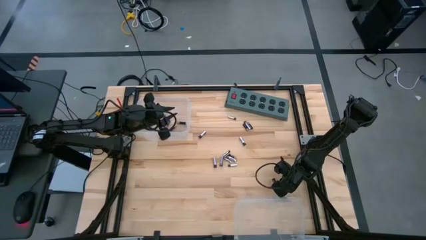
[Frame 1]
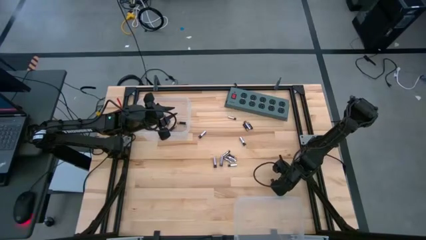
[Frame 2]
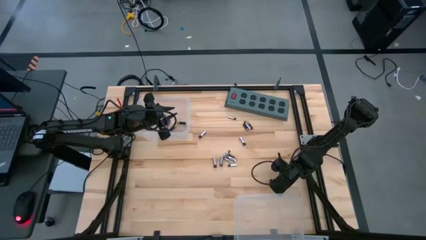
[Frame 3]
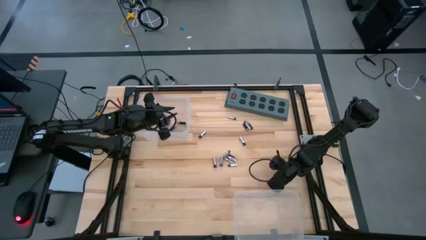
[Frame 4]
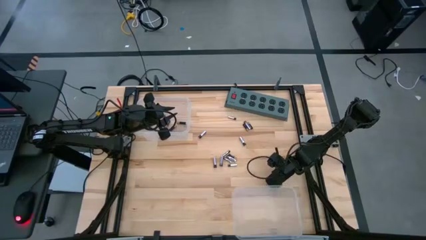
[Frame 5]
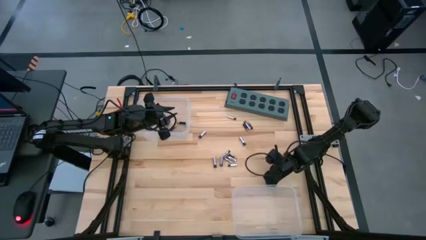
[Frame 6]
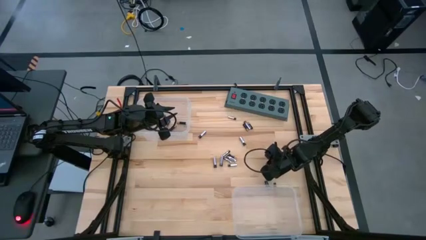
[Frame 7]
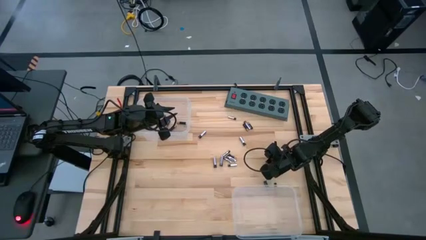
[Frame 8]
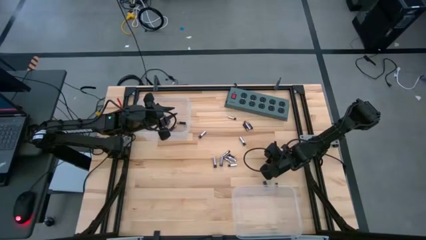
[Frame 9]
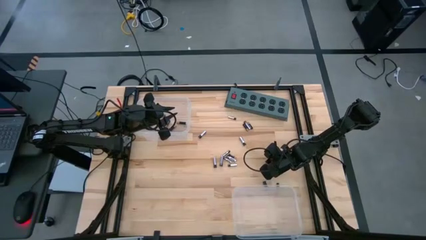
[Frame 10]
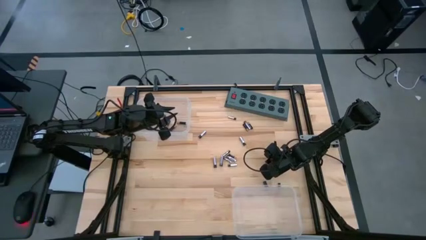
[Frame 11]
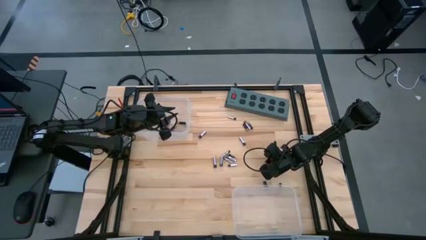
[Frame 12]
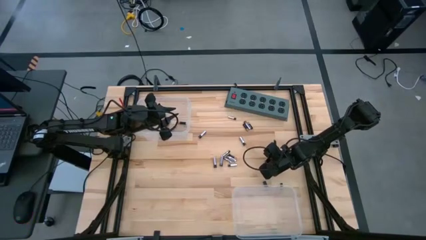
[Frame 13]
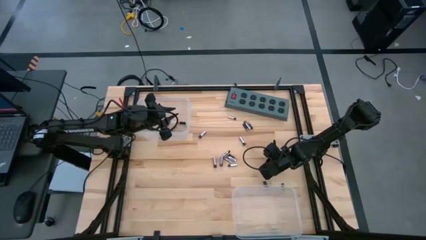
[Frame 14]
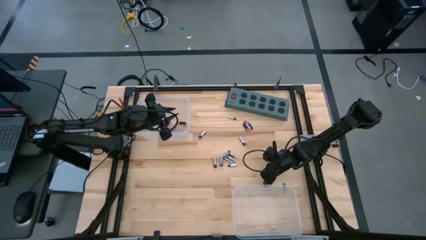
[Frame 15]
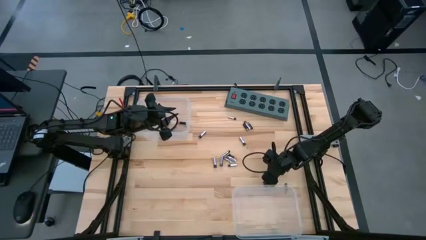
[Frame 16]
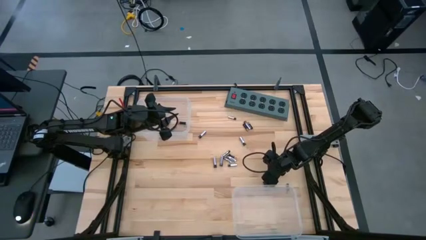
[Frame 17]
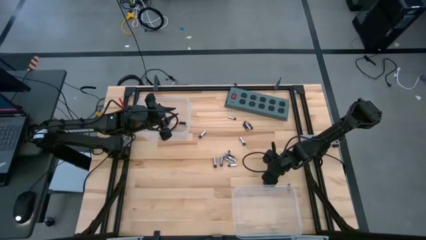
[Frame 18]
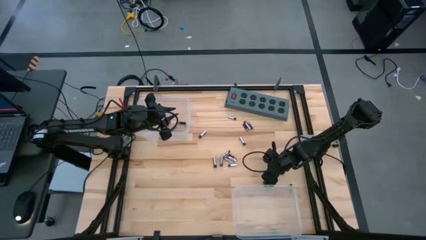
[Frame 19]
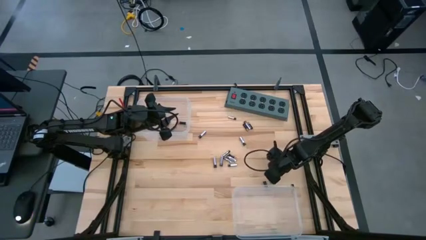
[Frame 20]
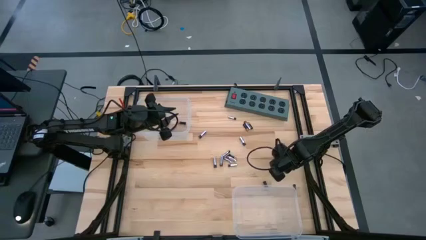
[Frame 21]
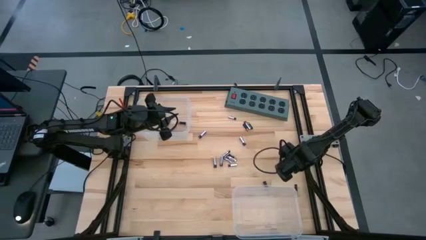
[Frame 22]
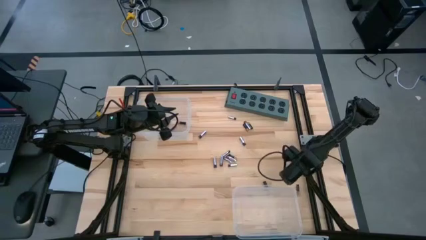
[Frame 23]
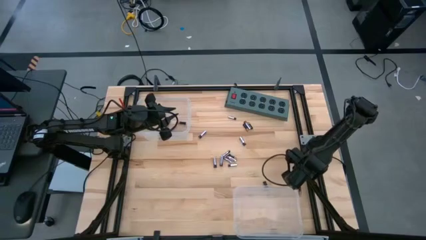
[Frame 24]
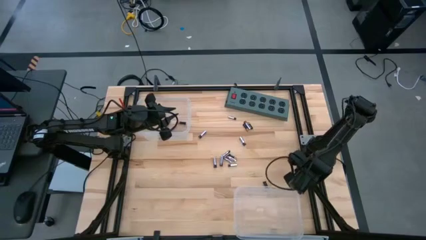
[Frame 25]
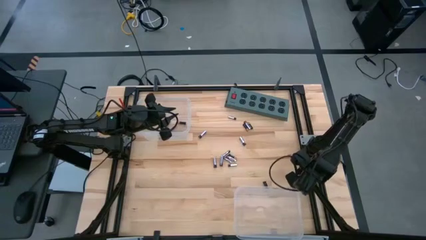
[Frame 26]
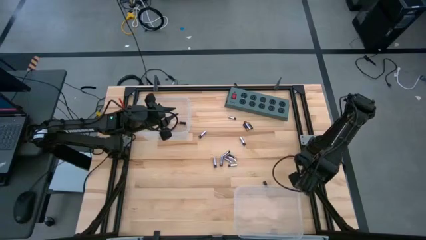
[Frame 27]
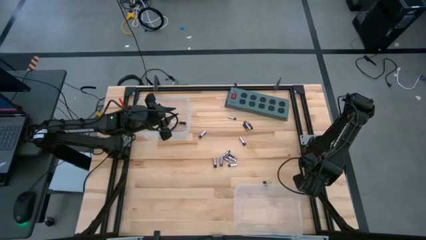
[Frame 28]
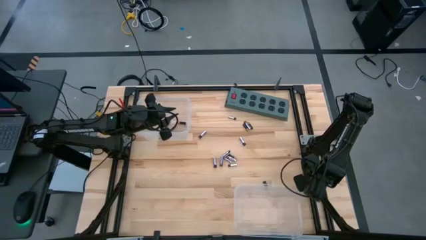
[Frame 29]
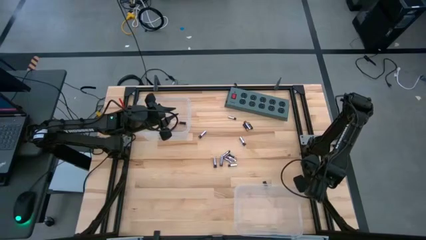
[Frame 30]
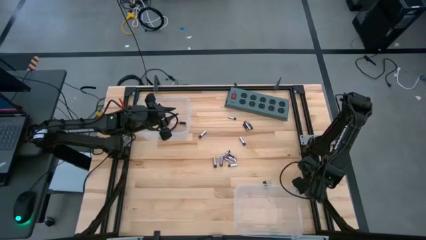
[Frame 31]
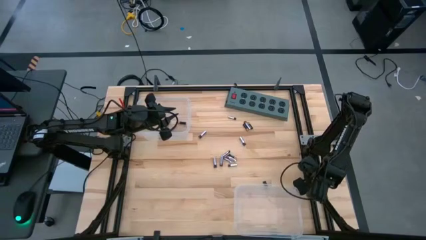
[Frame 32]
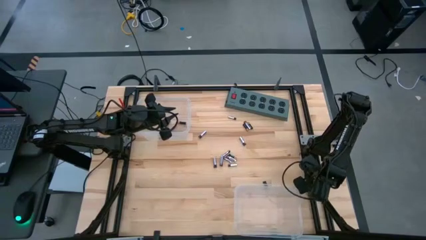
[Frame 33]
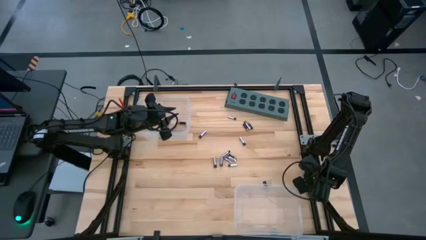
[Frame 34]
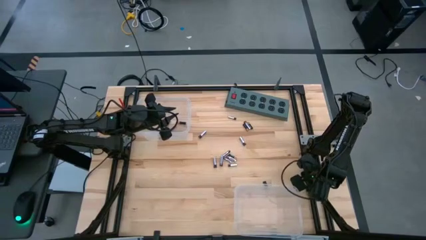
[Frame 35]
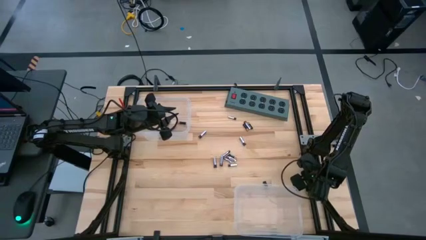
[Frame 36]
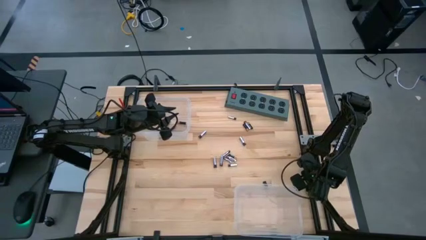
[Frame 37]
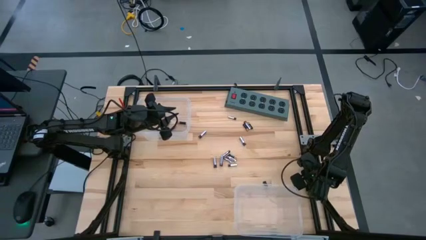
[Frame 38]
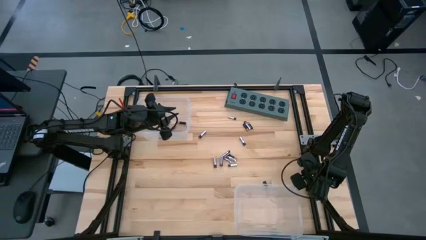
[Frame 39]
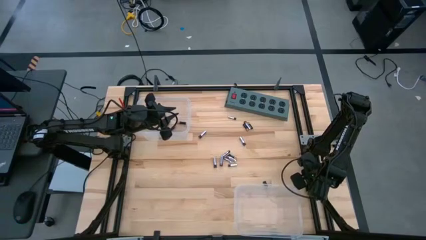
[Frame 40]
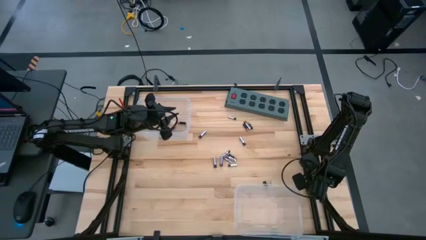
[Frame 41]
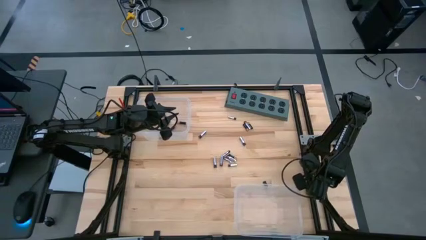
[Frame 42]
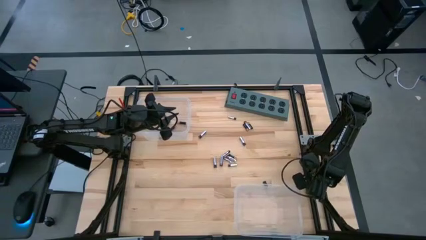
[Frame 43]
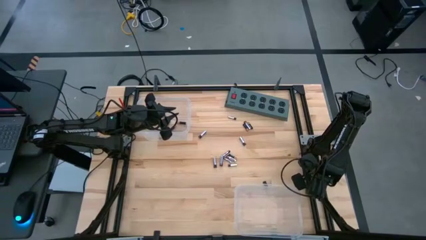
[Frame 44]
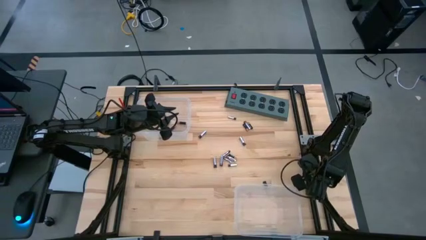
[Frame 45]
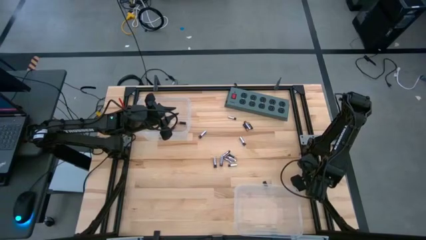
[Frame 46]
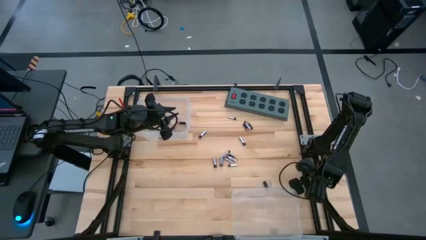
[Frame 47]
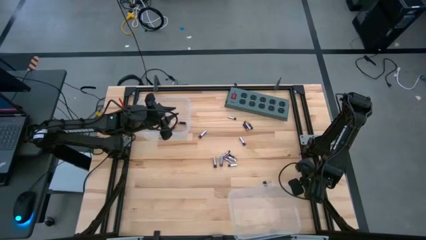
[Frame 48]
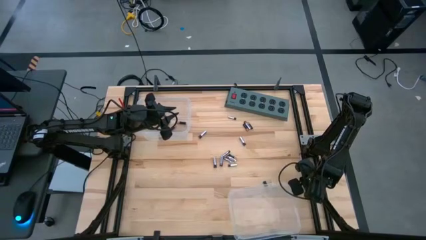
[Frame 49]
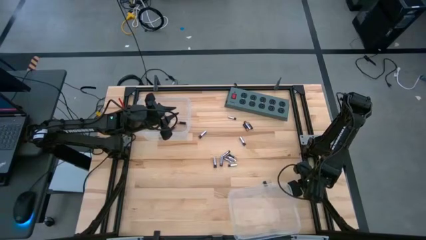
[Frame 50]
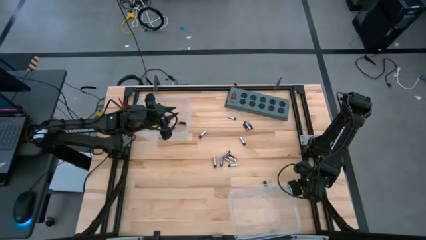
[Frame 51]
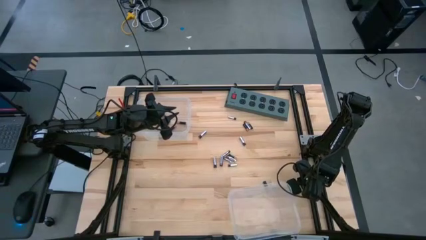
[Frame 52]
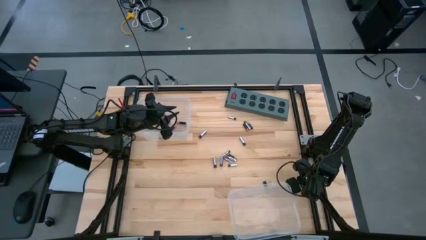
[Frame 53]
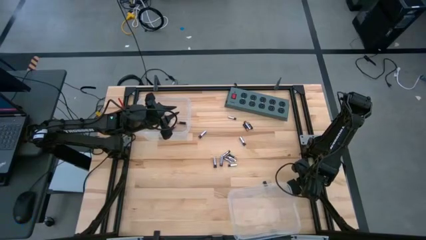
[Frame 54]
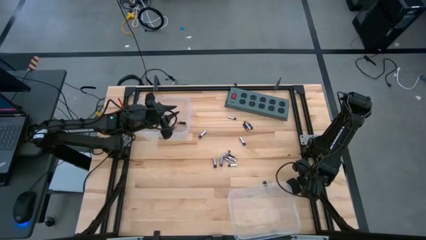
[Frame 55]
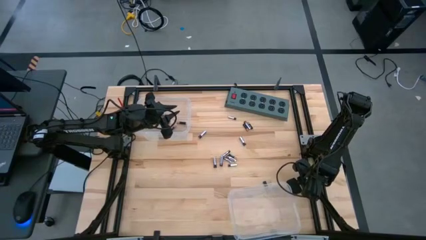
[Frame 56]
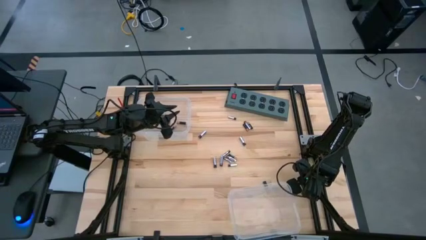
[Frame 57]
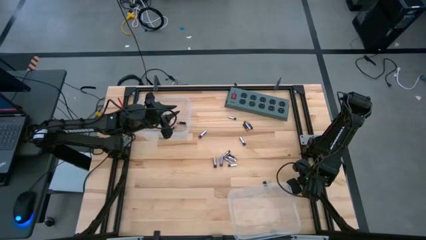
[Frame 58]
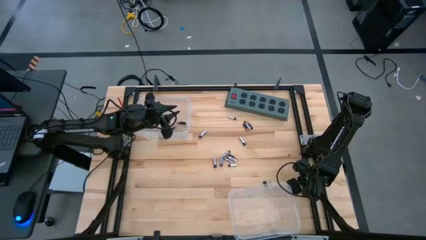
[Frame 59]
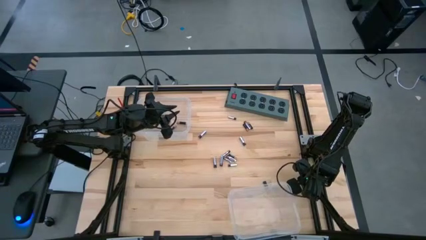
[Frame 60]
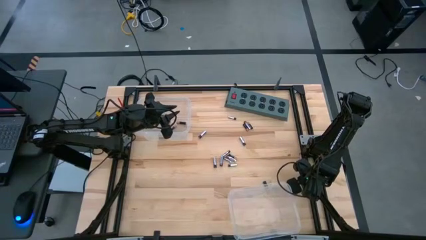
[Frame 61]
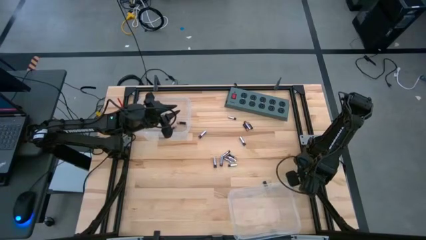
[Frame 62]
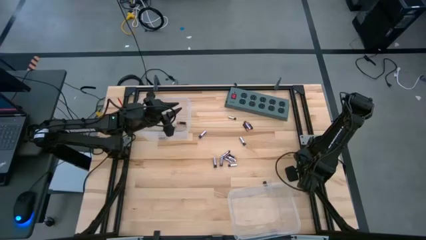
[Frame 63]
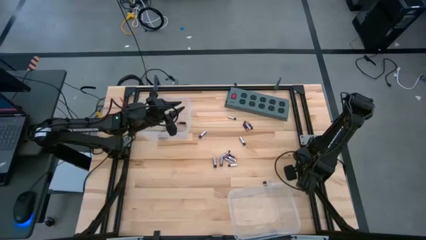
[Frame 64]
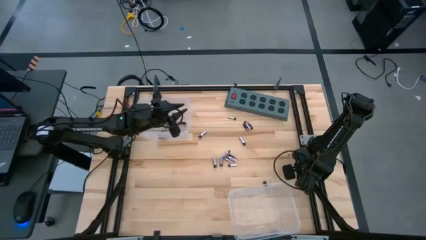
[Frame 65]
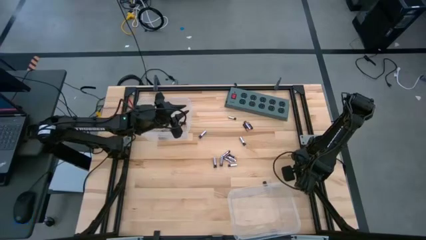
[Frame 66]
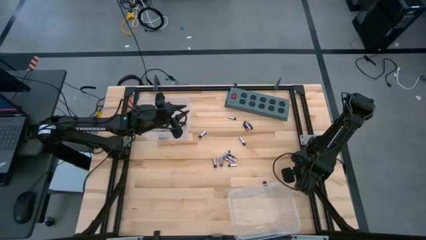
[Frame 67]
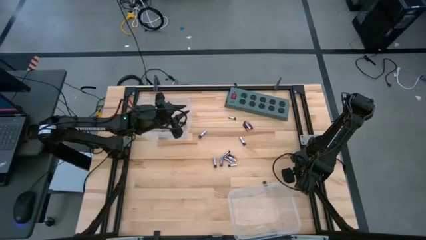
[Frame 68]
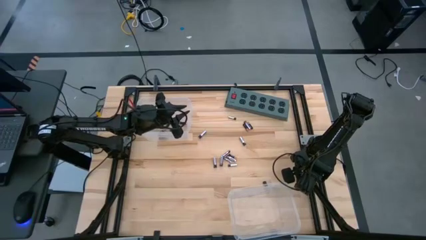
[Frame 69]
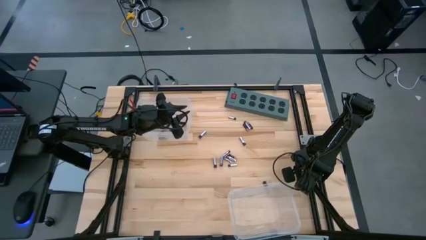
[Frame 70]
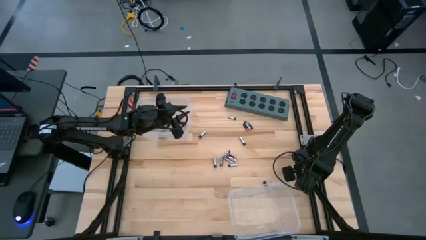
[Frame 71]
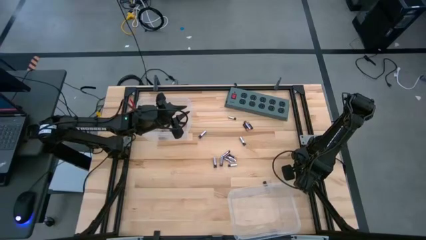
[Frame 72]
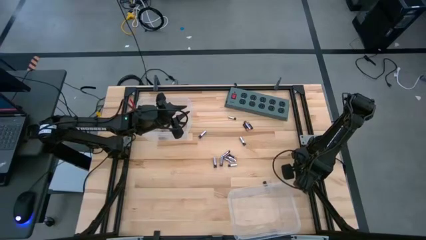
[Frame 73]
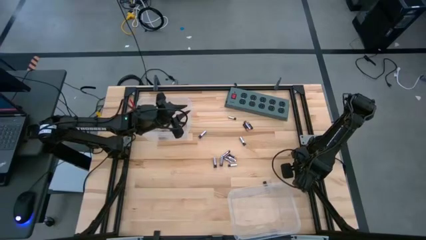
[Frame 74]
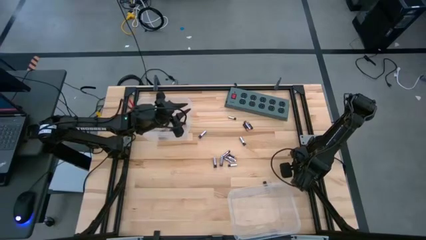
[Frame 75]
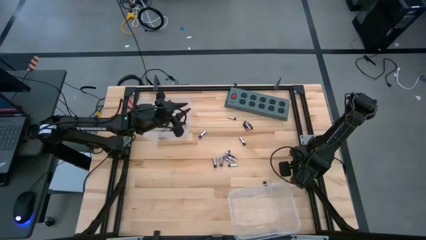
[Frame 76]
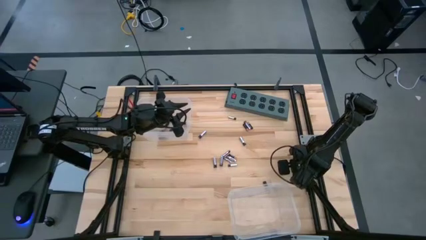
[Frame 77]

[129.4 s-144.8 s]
Task: Sort batteries
Put the black battery into the top transparent bin
